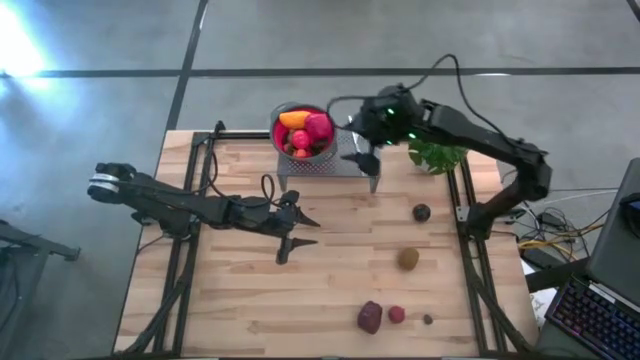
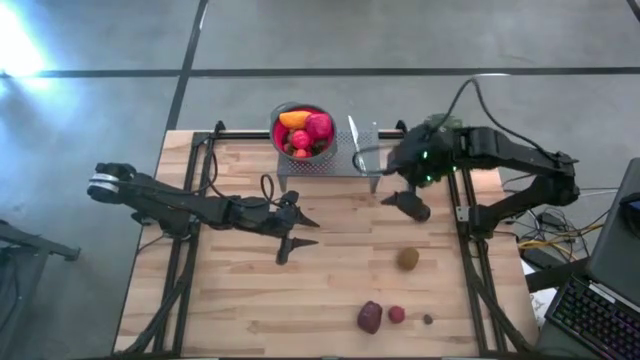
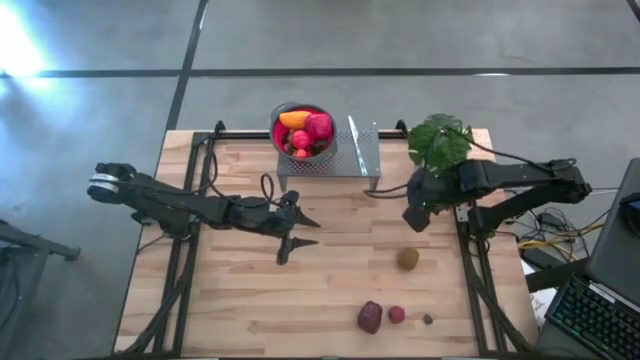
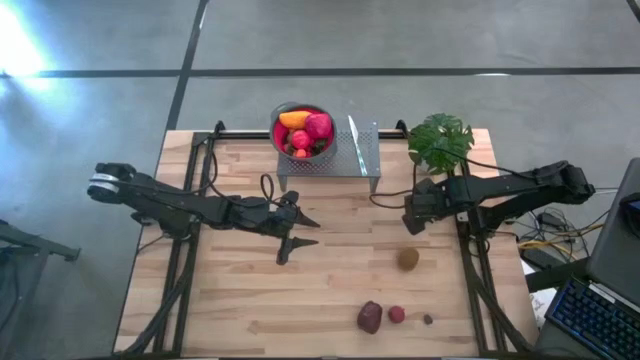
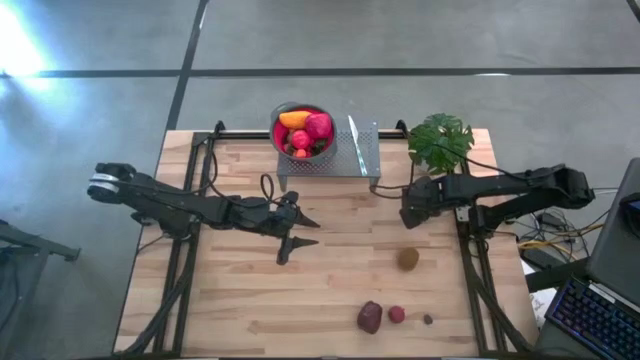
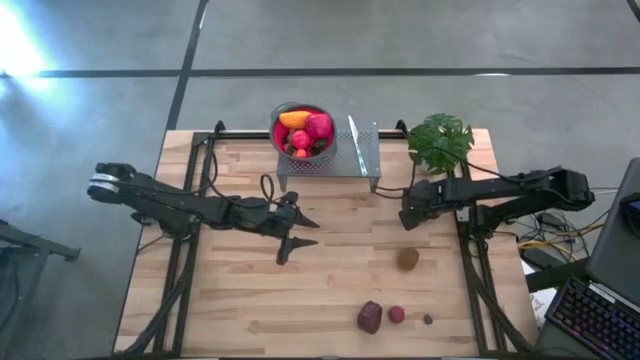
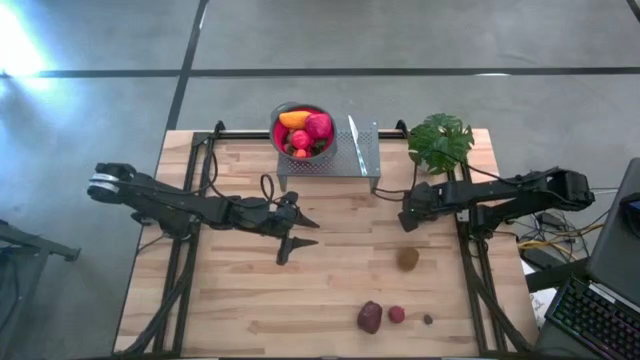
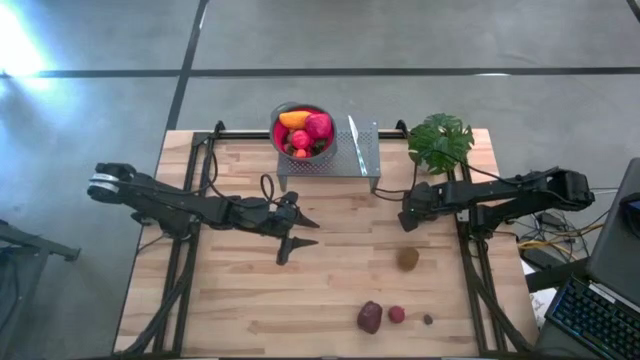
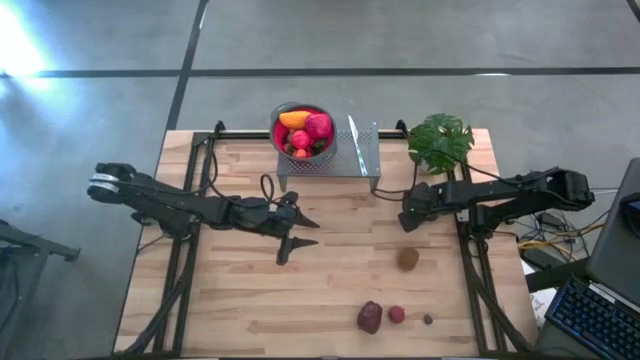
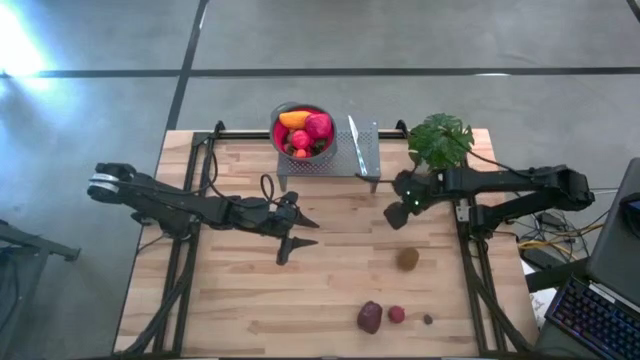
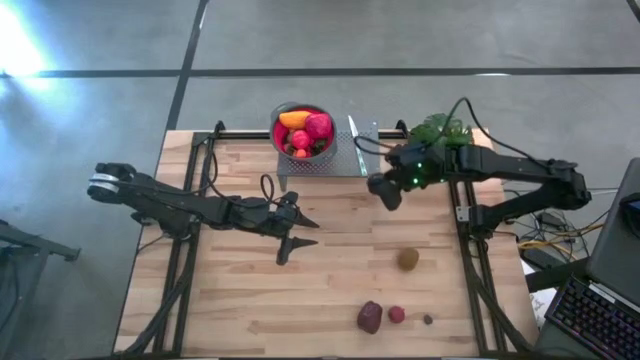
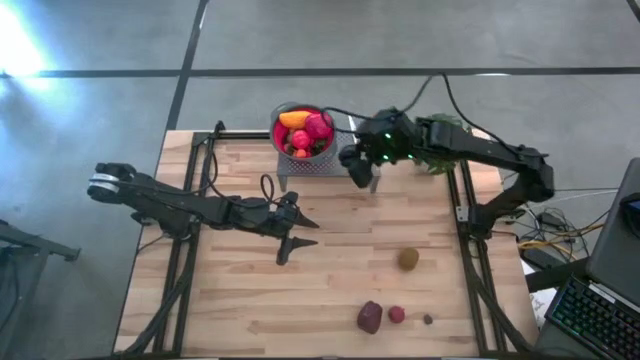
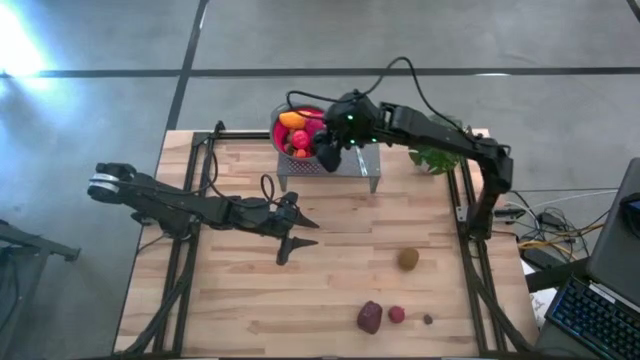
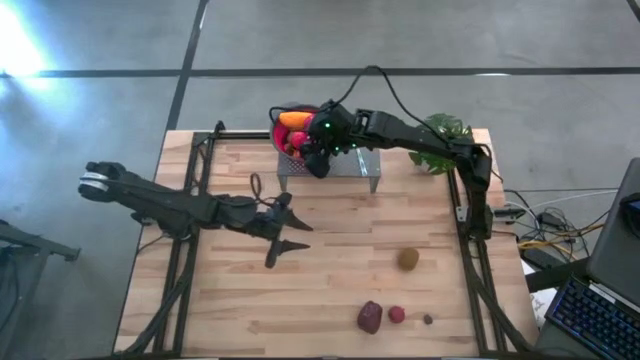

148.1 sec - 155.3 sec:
Task: Pick & Place Fruit
Put the black plum into the red strainer bowl on the shelf

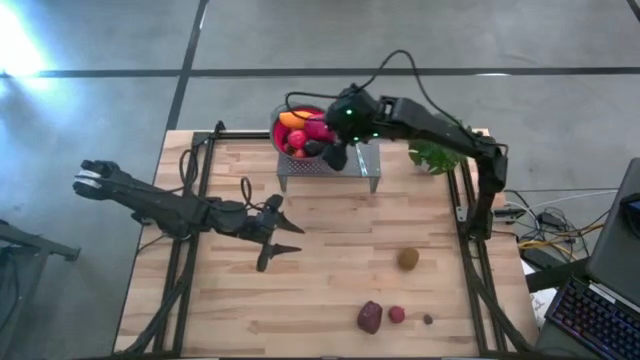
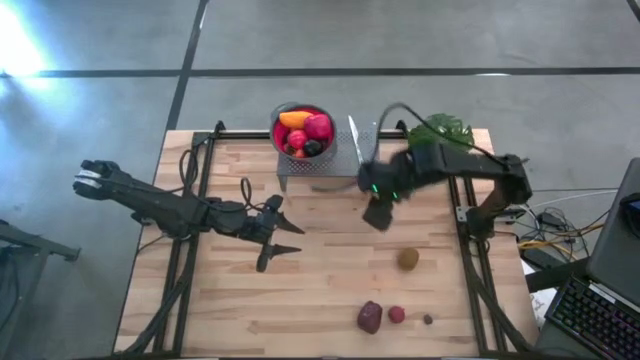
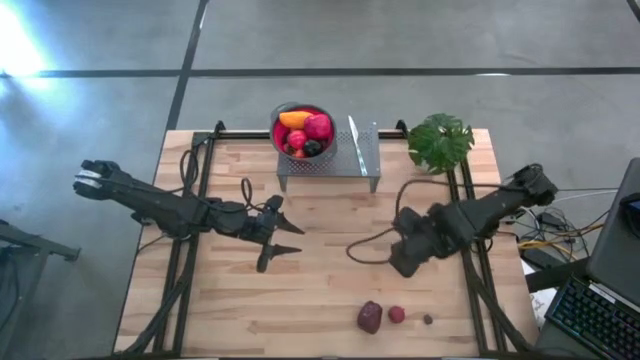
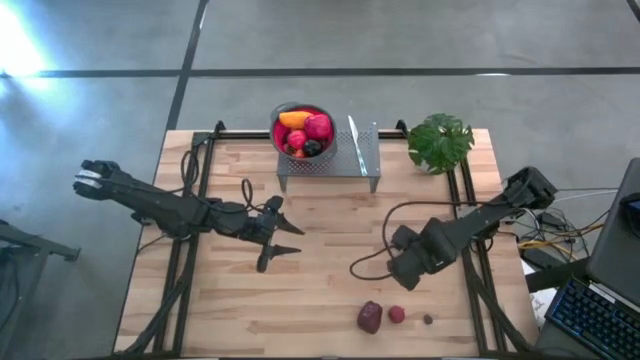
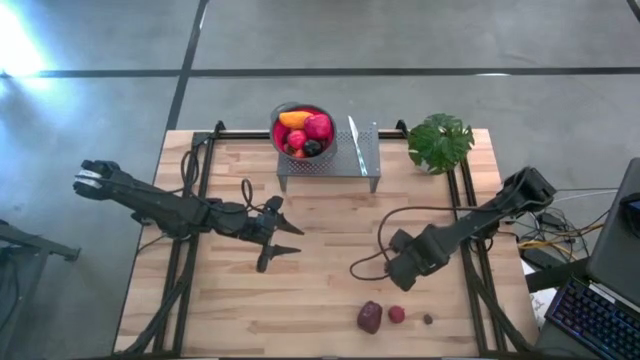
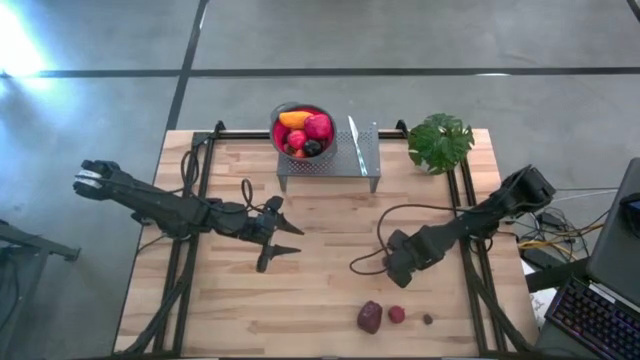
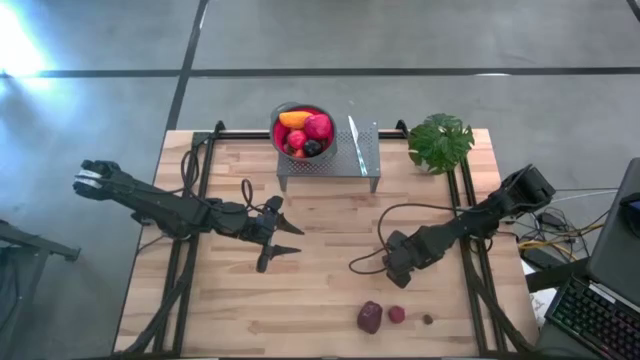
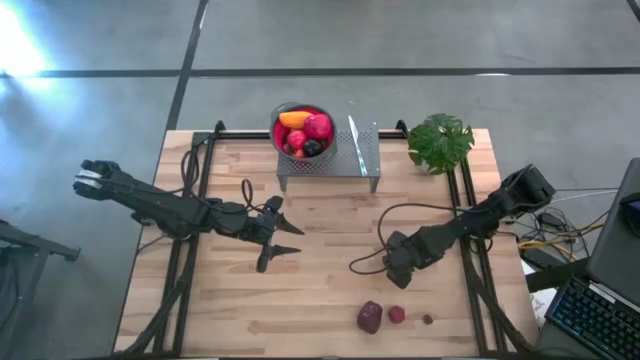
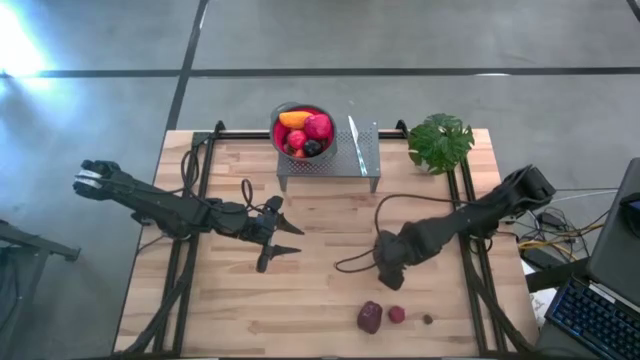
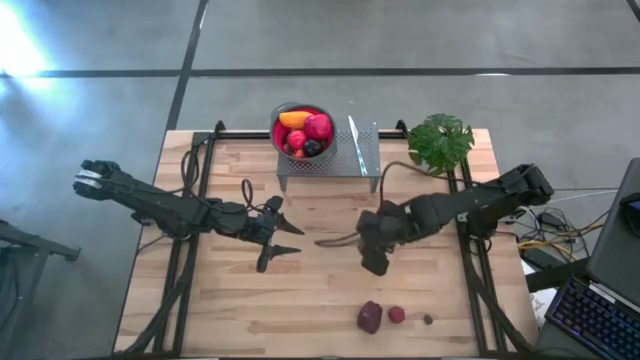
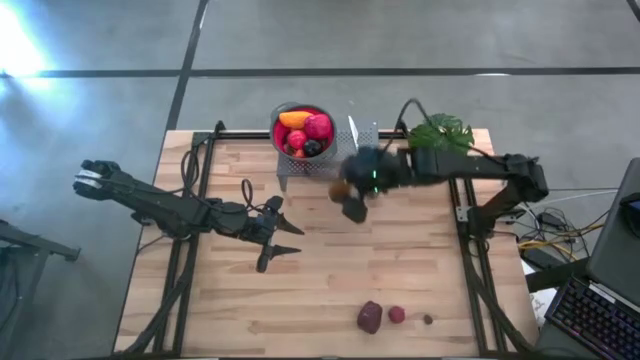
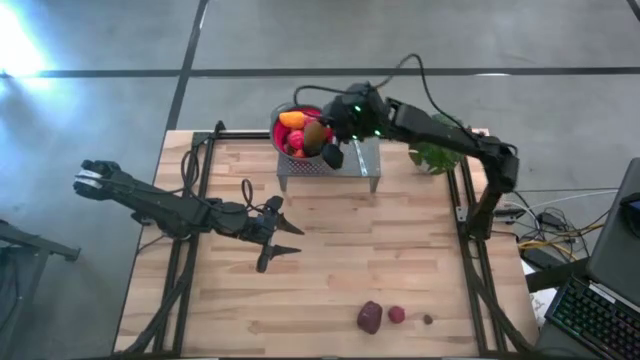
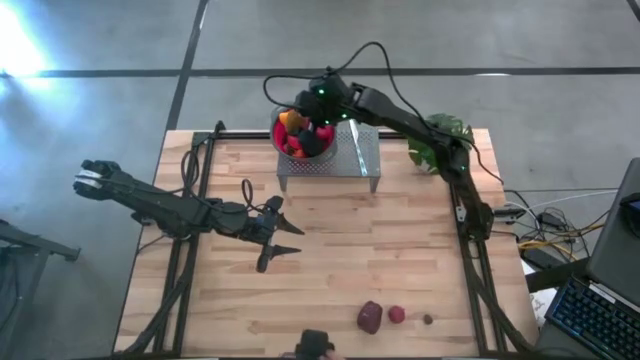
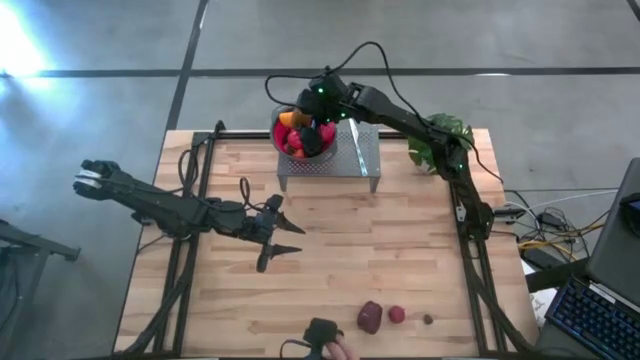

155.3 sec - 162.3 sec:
Put the brown kiwi into the red strainer bowl on the shelf

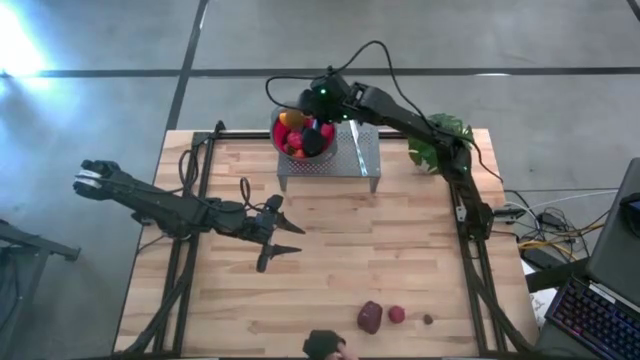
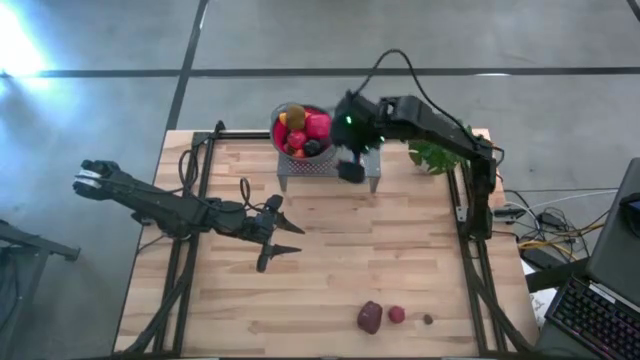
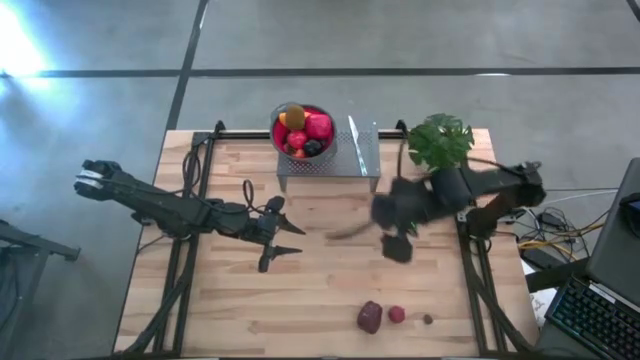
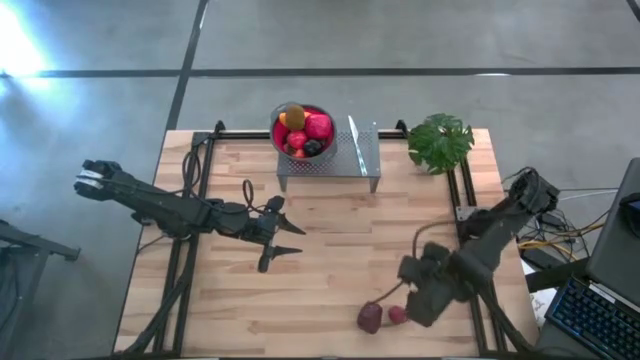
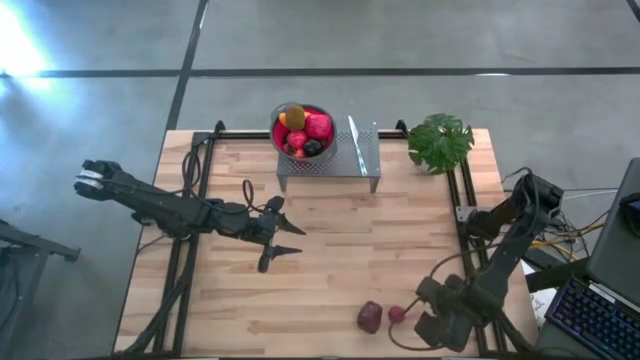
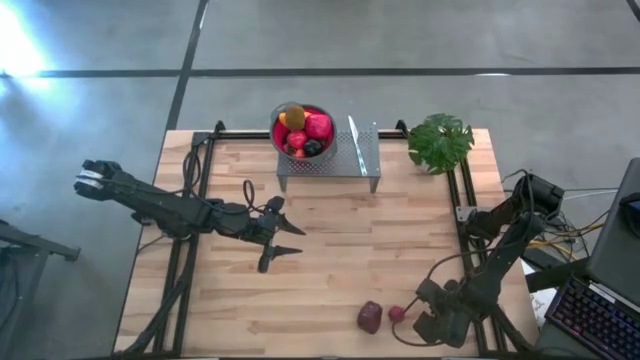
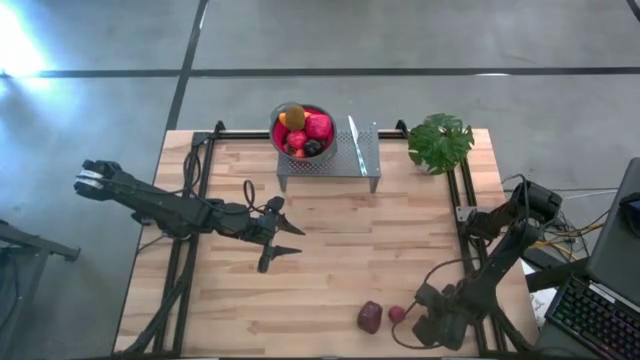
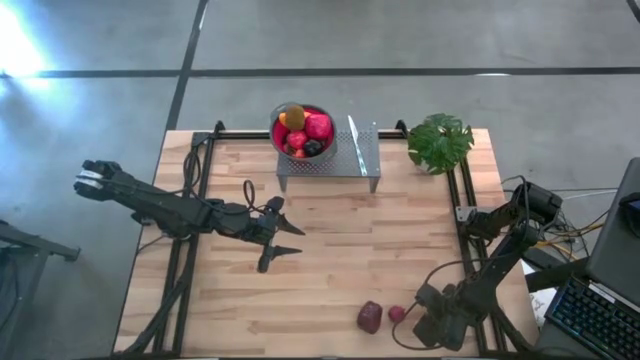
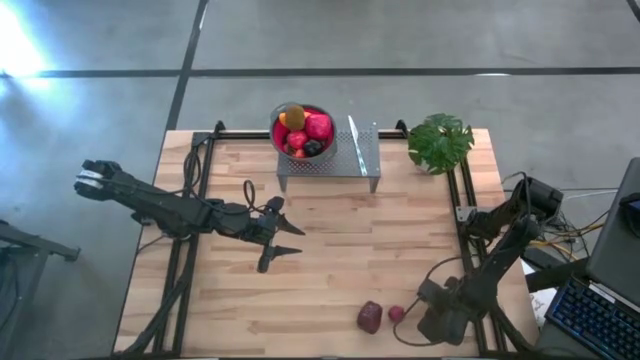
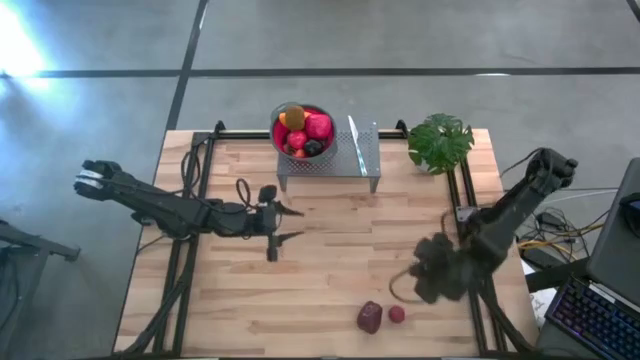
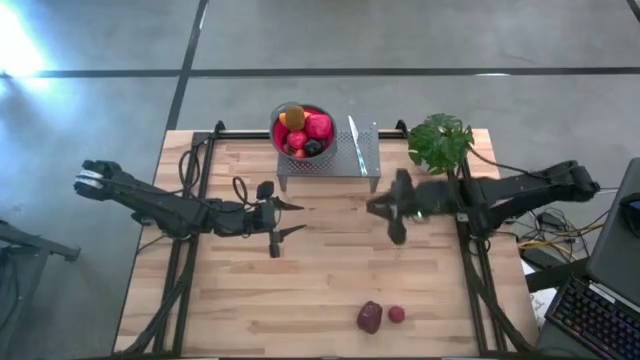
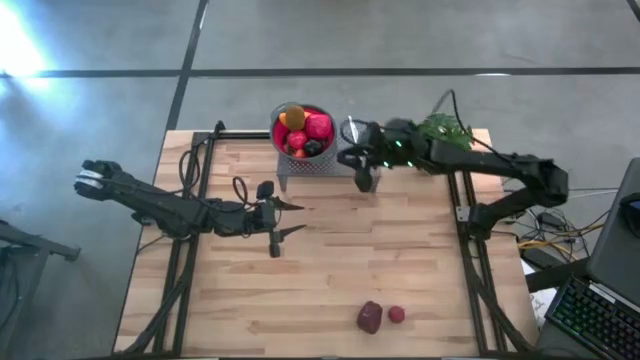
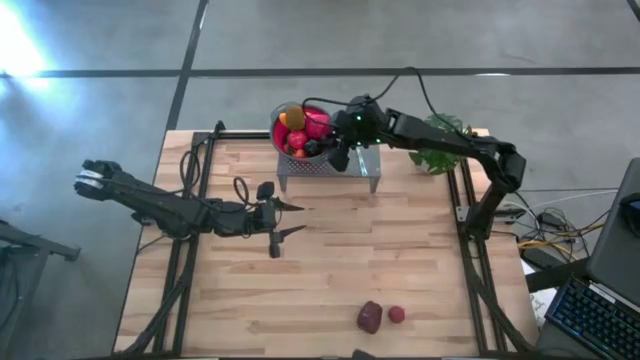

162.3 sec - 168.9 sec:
Put the blackberry into the red strainer bowl on the shelf
